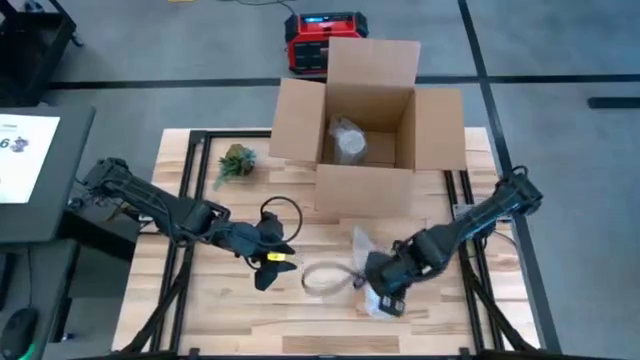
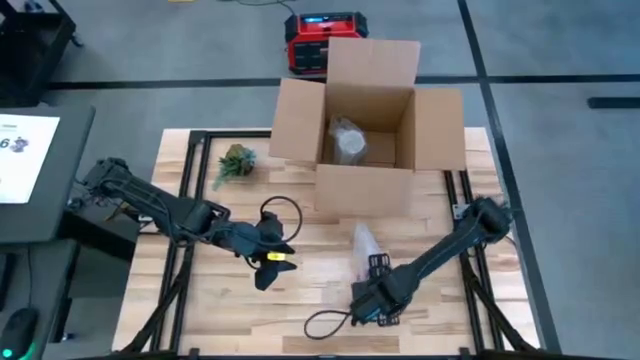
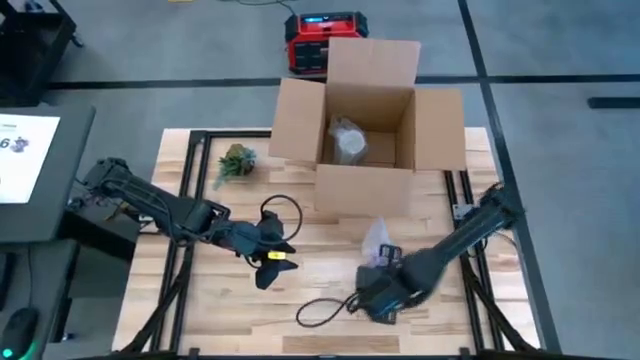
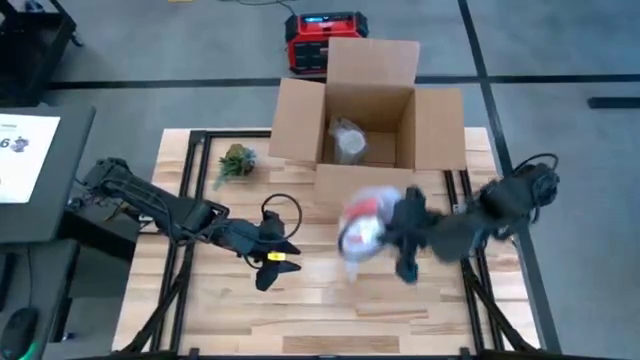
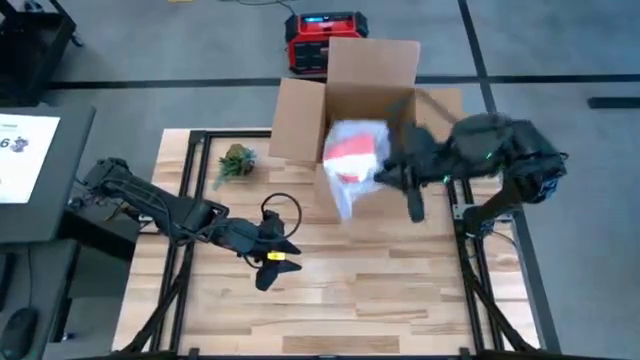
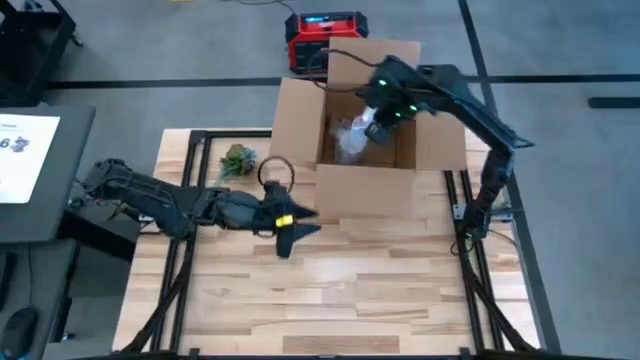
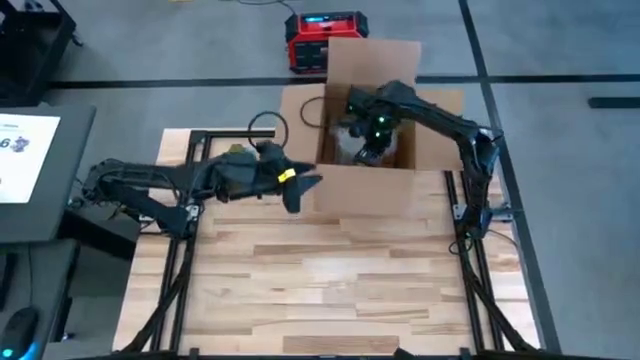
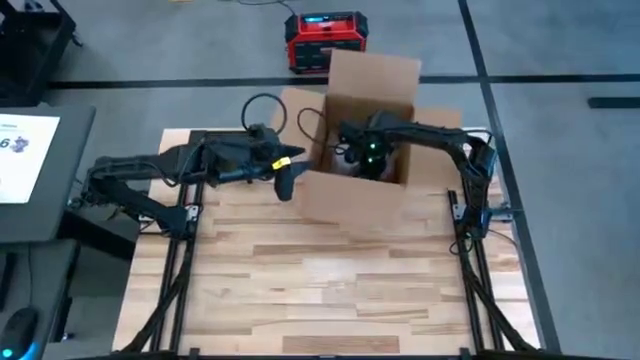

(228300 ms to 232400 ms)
Task: wrap mug
Put the red mug into the cardboard box

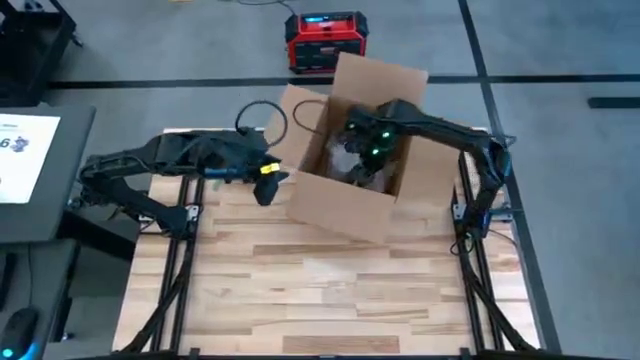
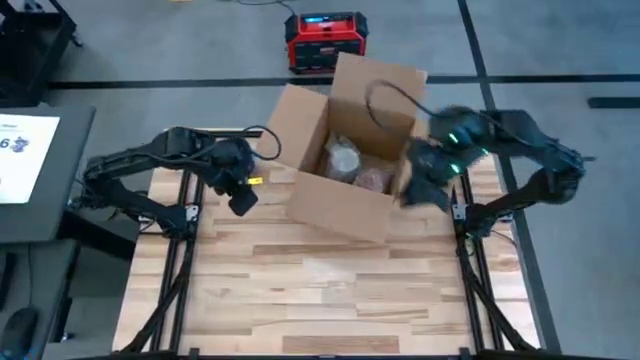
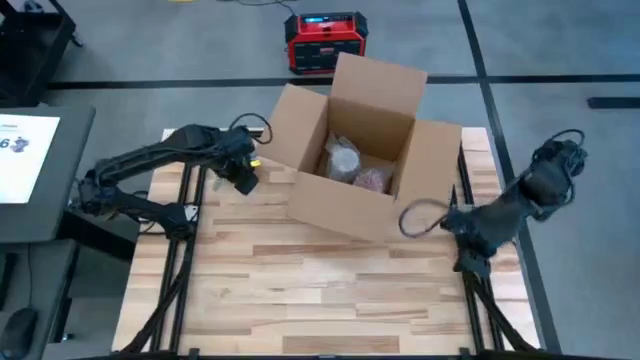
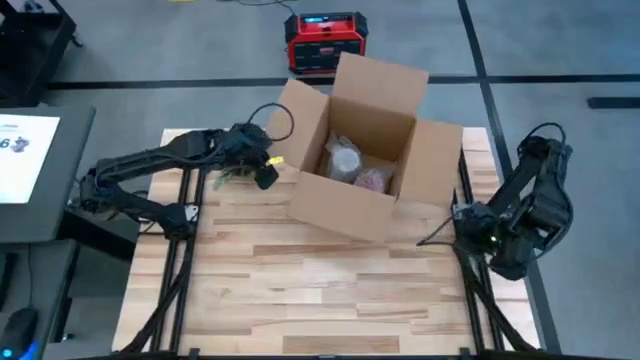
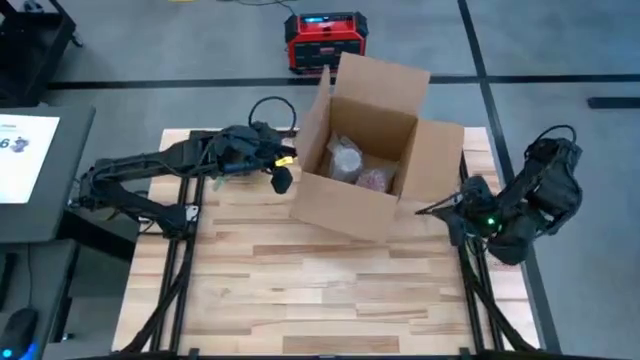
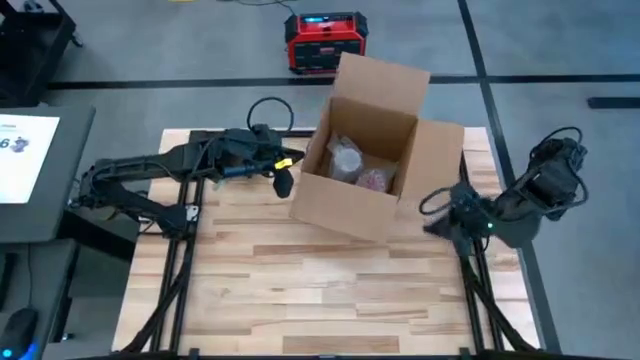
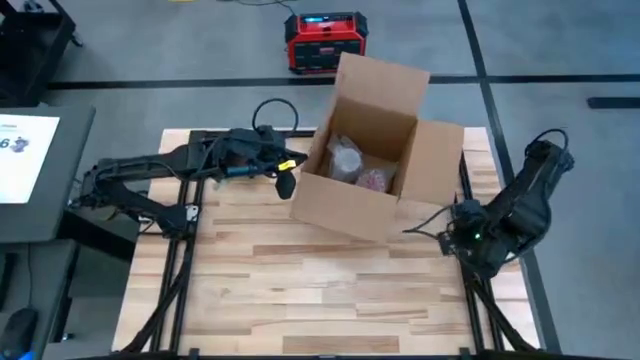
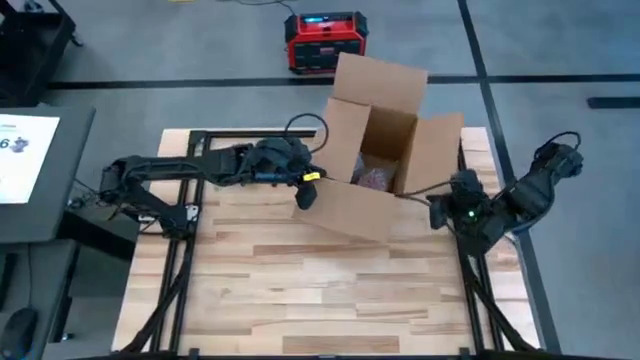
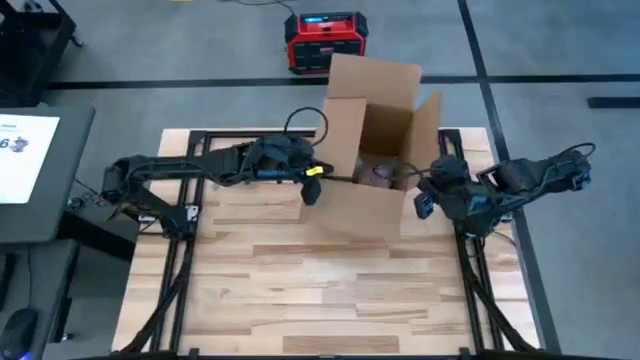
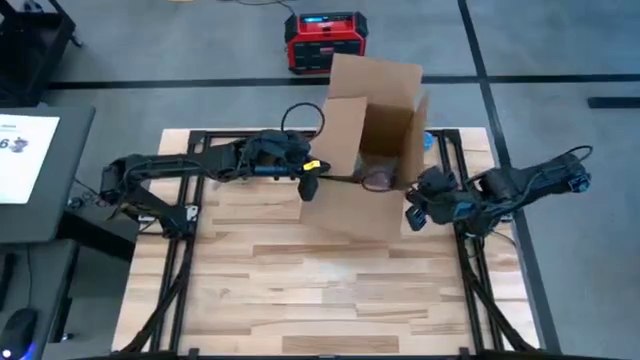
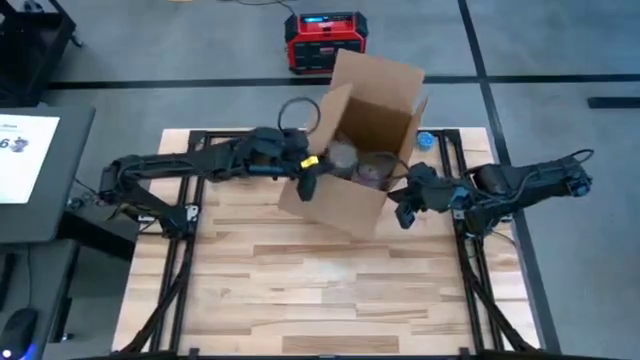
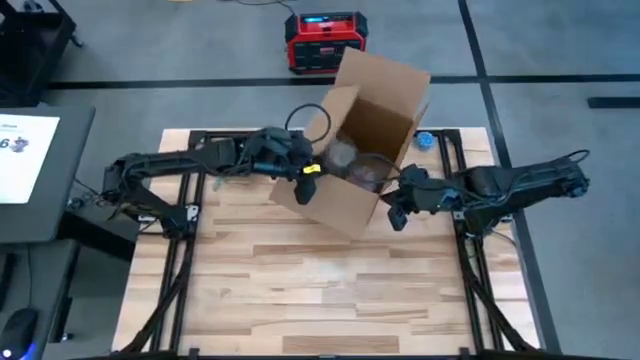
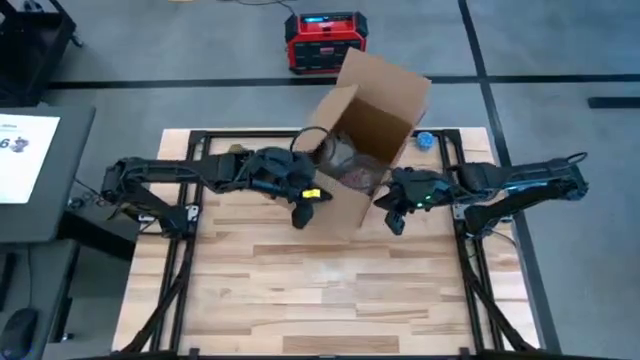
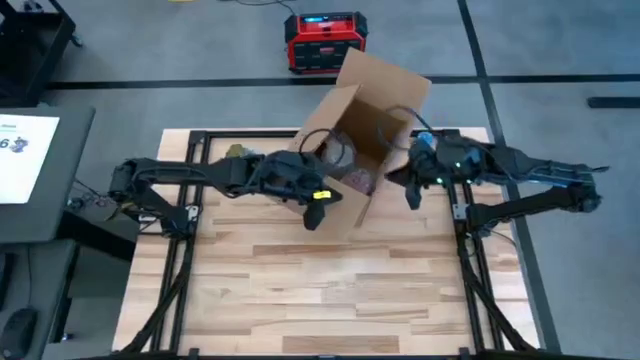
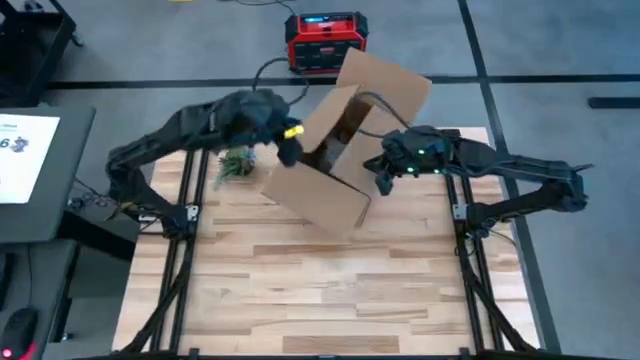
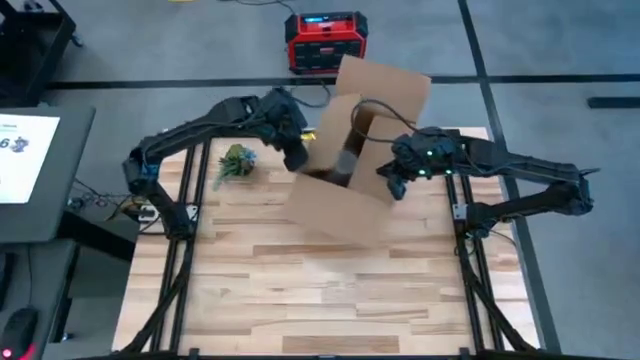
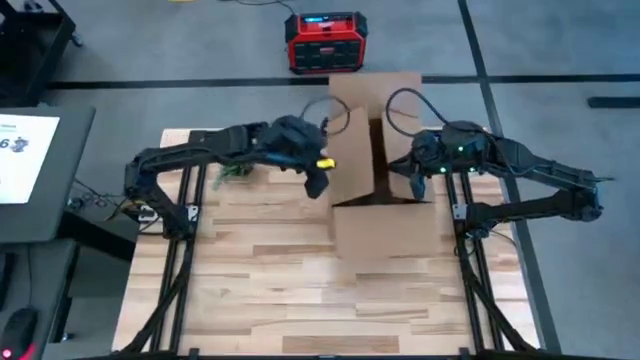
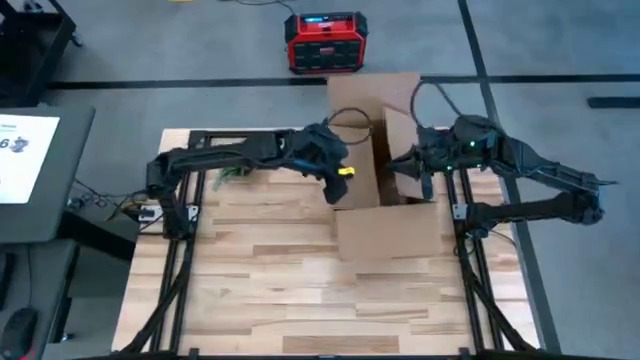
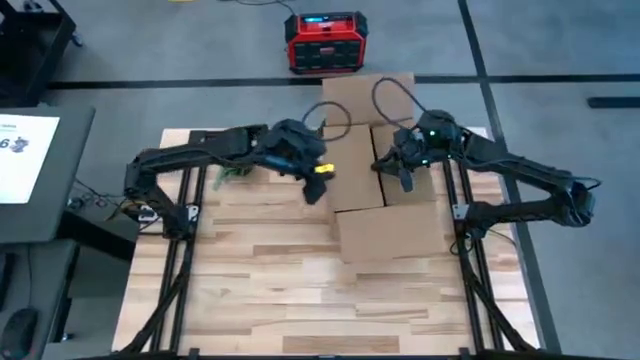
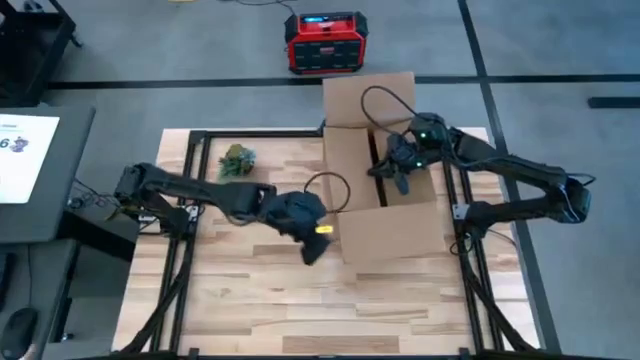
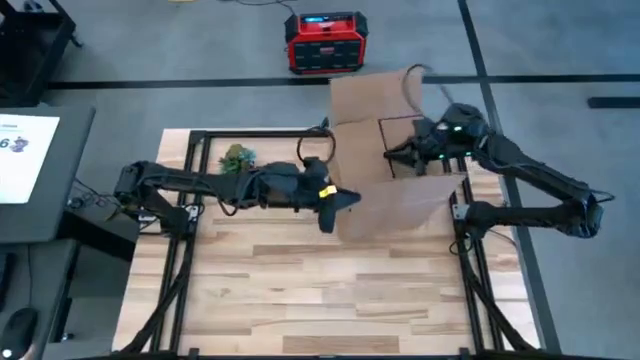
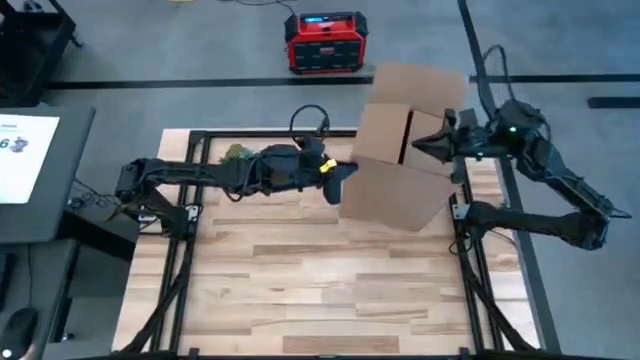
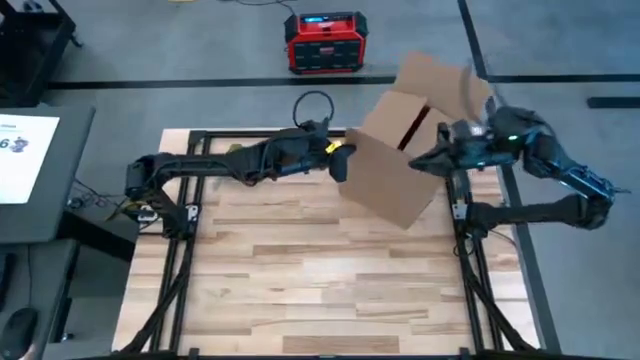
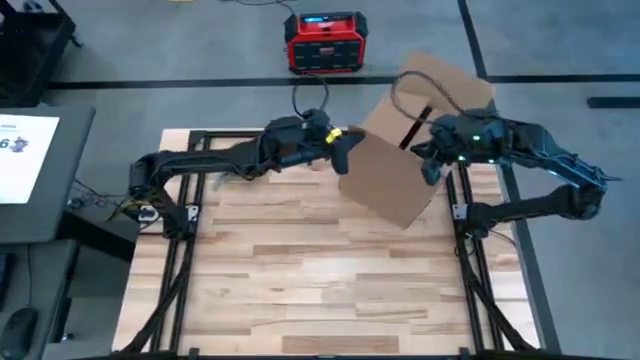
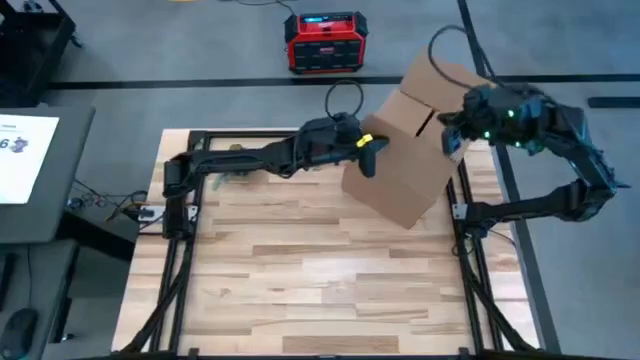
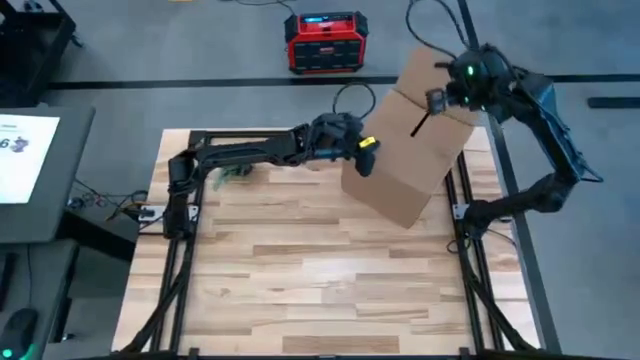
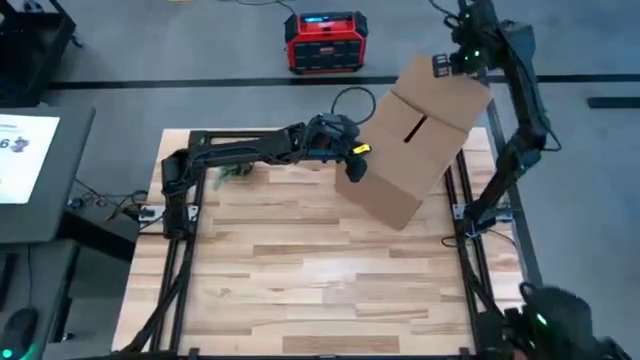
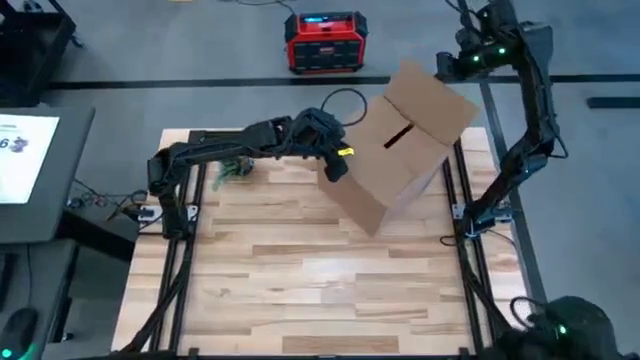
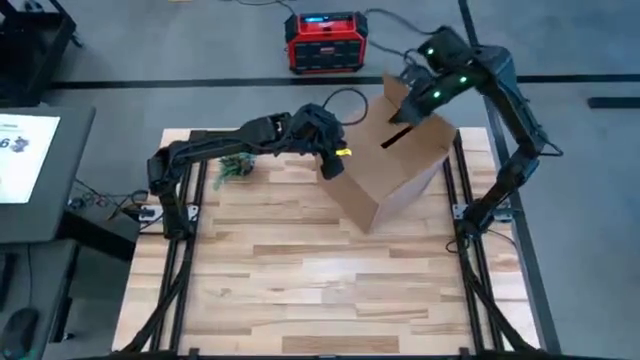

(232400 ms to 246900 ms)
Close the cardboard box

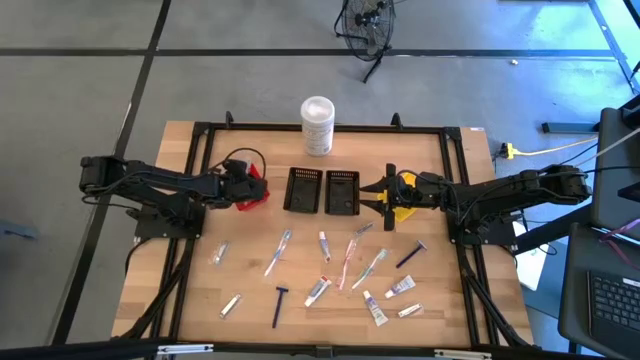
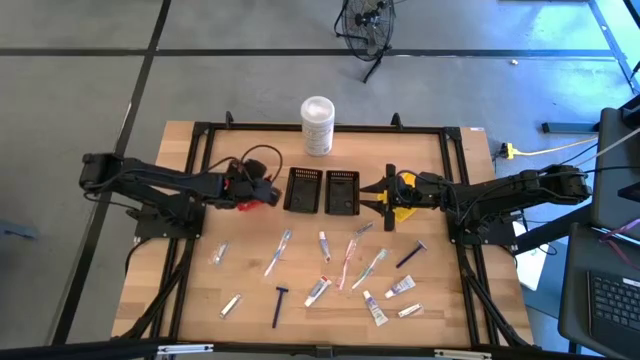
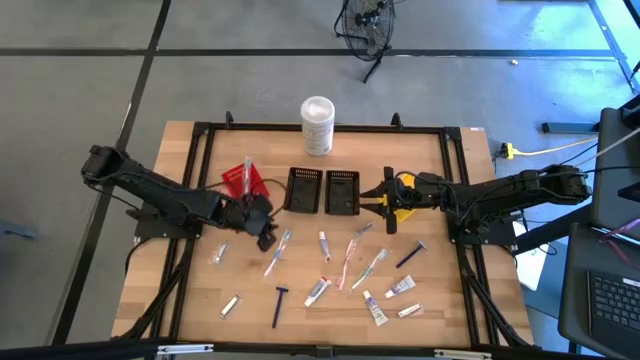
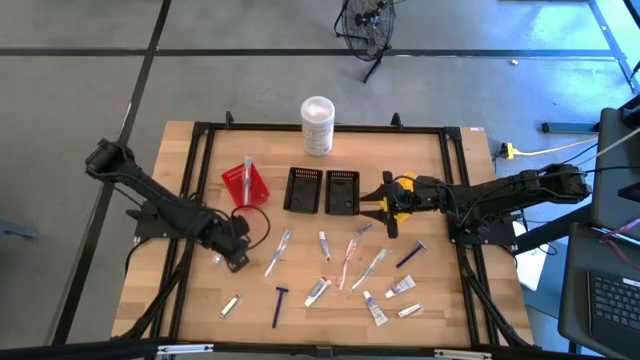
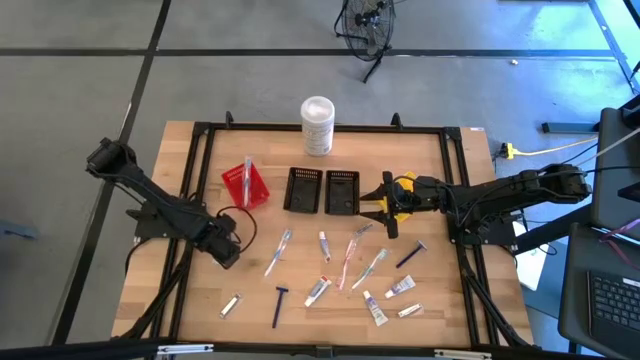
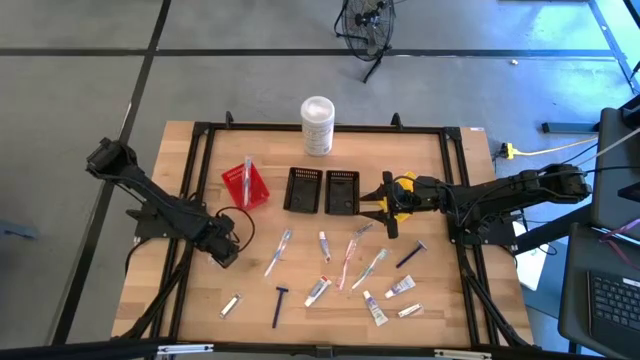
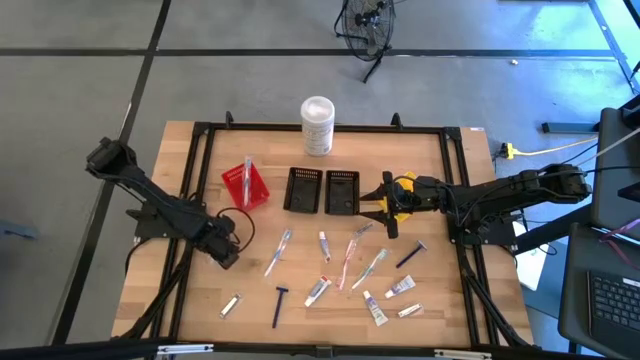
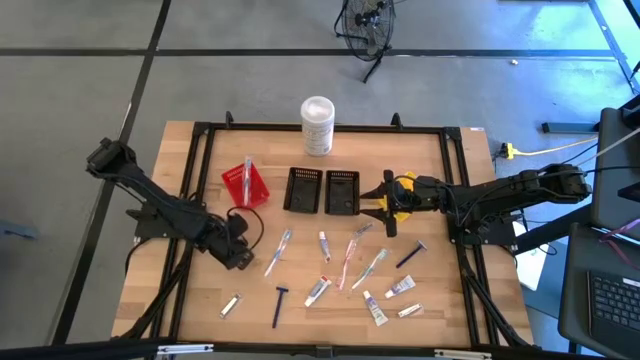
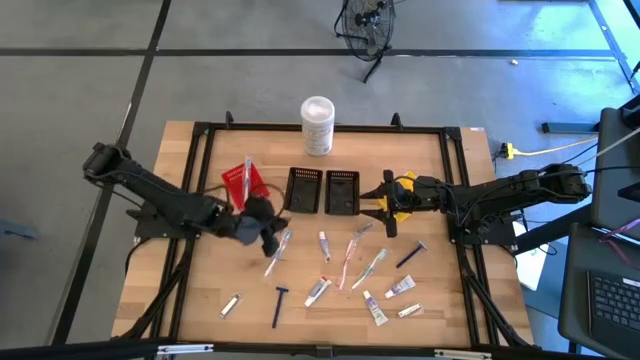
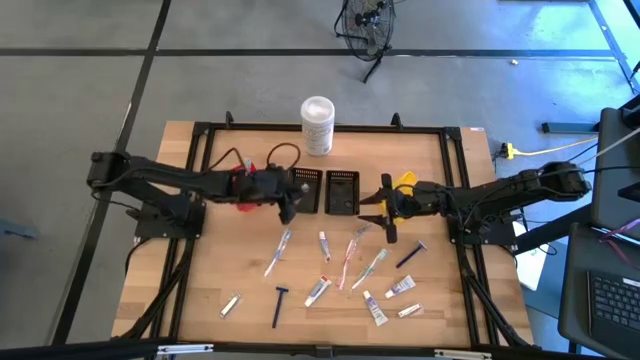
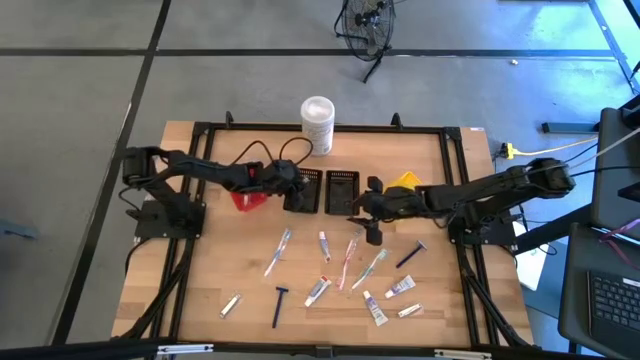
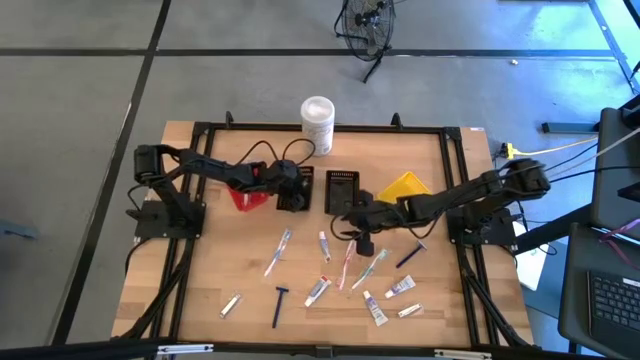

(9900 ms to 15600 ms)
Task: Pick & Place Travel size toiletries
Put the silver nail cutter into the left black bin
